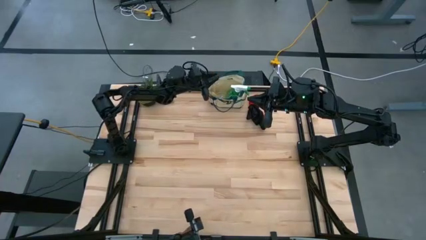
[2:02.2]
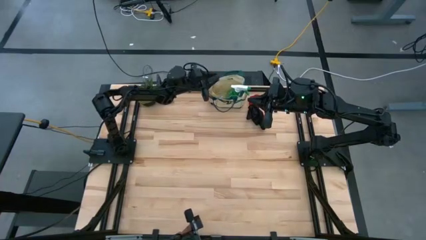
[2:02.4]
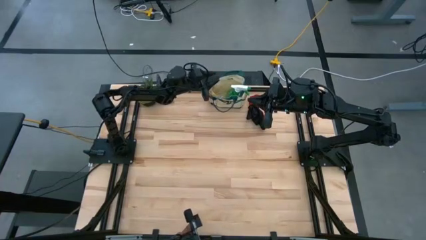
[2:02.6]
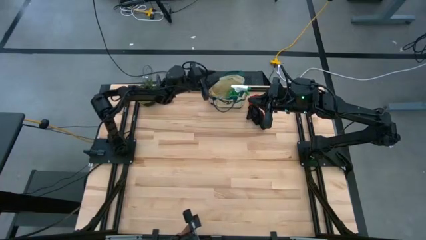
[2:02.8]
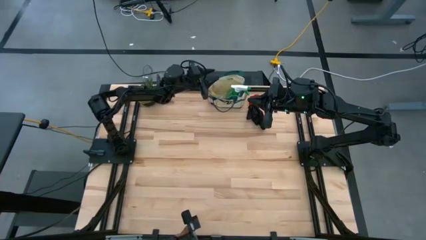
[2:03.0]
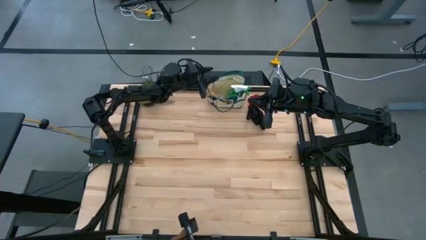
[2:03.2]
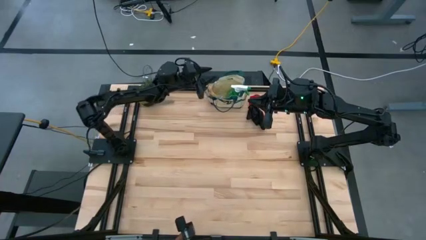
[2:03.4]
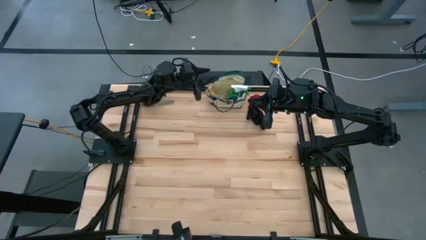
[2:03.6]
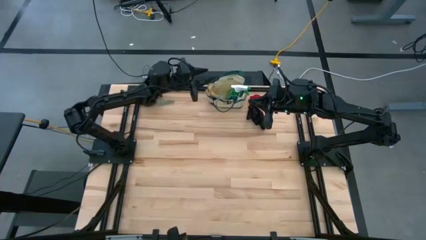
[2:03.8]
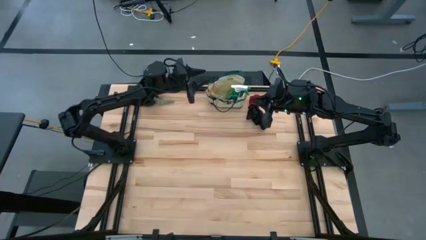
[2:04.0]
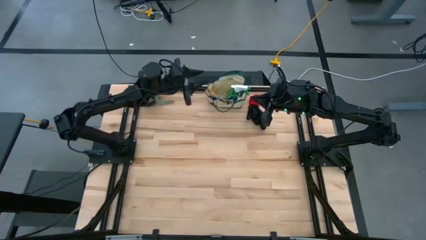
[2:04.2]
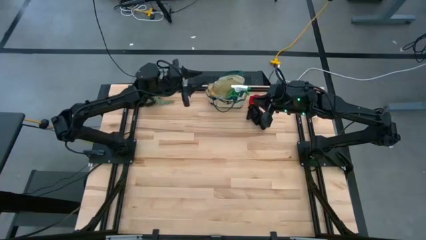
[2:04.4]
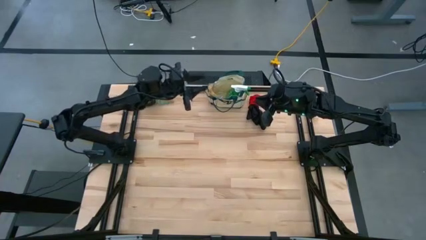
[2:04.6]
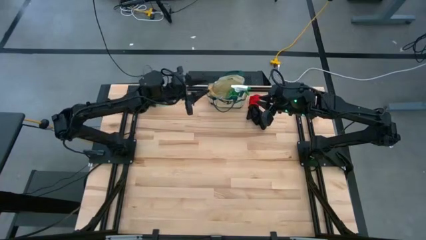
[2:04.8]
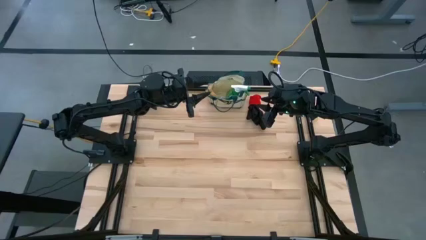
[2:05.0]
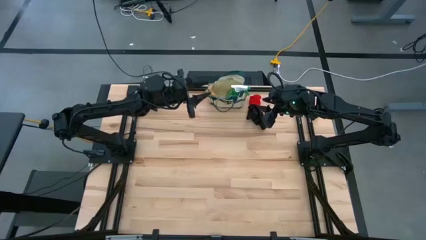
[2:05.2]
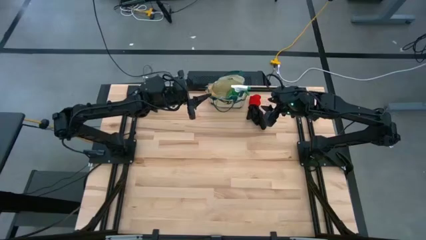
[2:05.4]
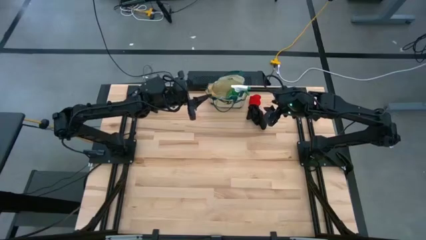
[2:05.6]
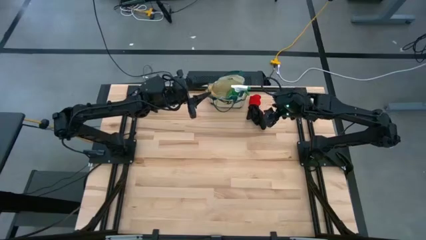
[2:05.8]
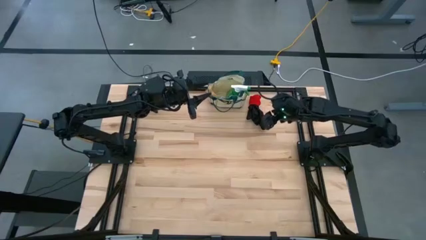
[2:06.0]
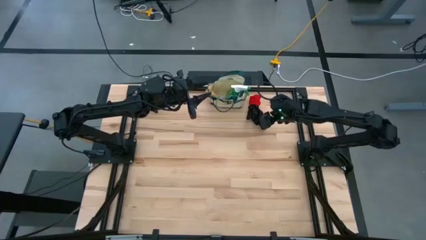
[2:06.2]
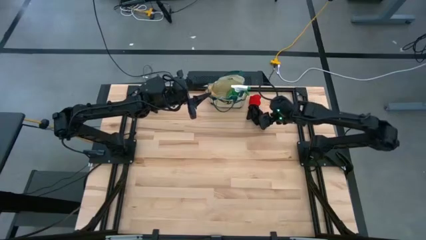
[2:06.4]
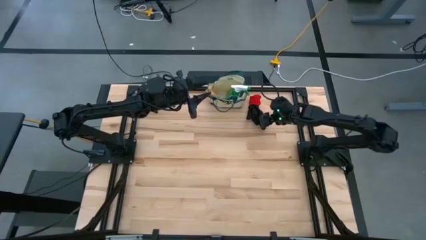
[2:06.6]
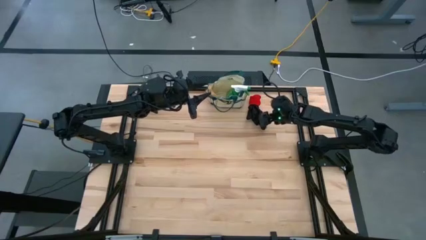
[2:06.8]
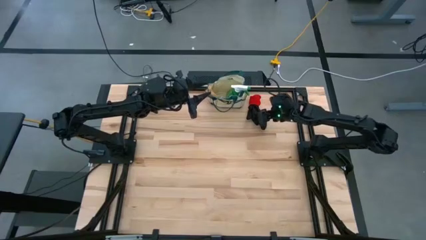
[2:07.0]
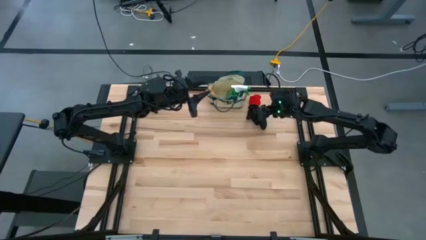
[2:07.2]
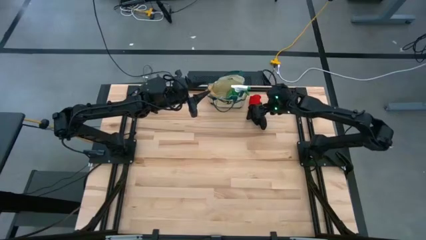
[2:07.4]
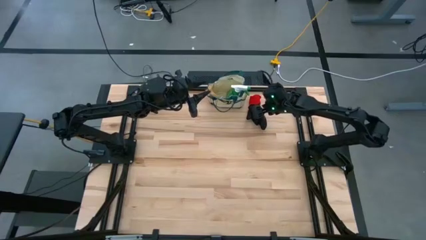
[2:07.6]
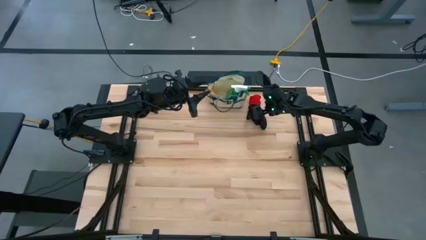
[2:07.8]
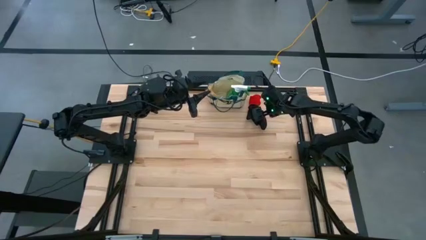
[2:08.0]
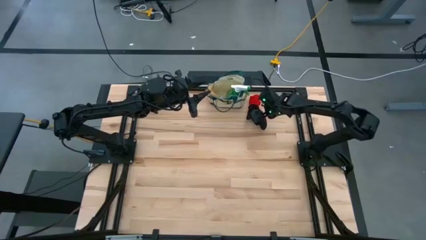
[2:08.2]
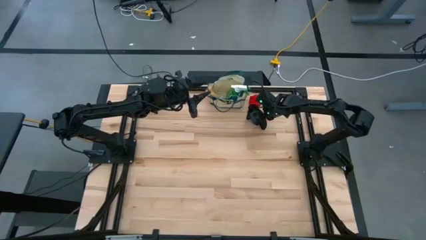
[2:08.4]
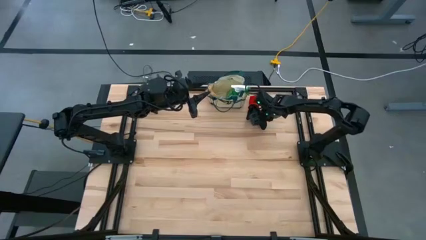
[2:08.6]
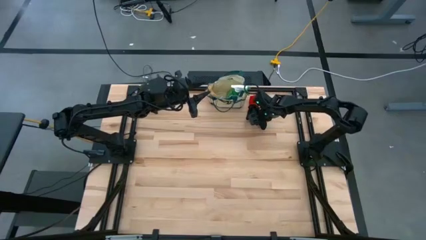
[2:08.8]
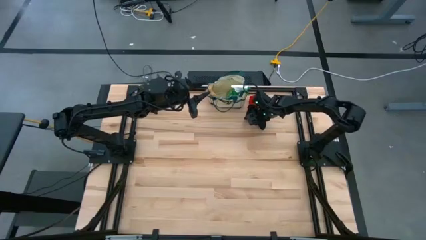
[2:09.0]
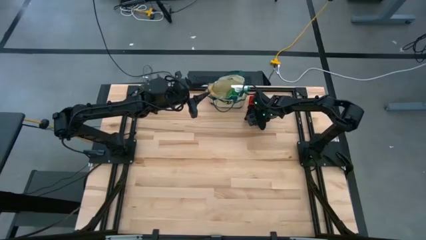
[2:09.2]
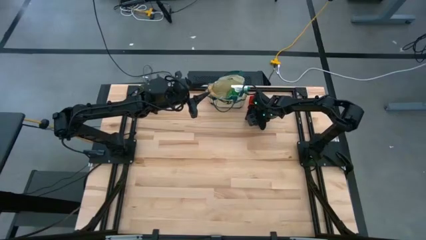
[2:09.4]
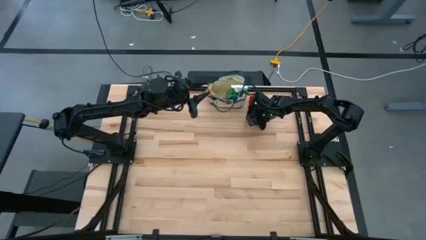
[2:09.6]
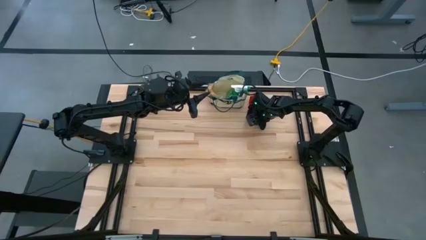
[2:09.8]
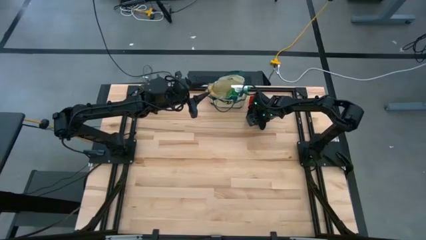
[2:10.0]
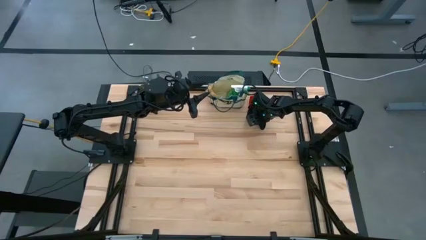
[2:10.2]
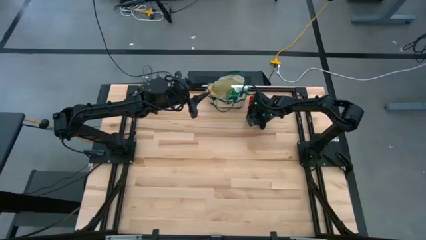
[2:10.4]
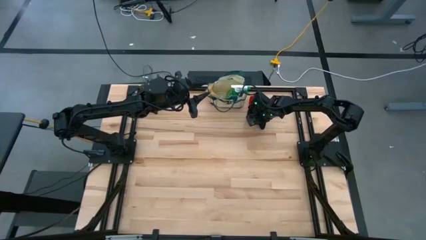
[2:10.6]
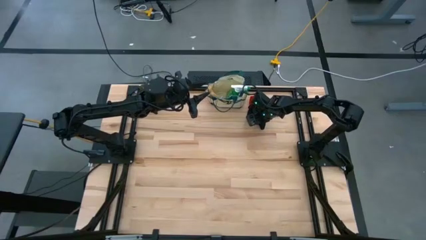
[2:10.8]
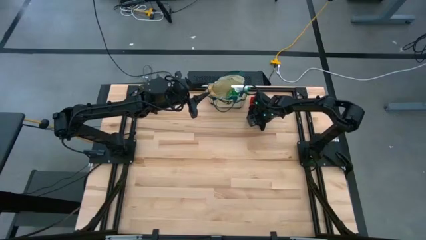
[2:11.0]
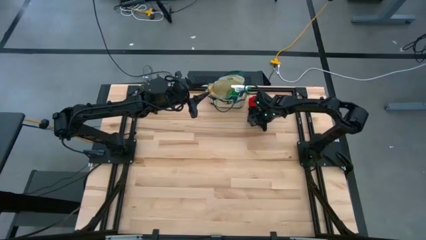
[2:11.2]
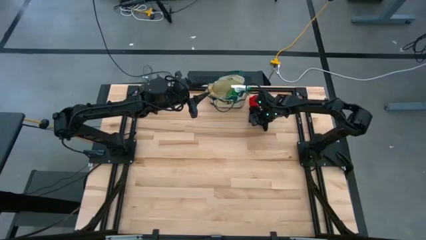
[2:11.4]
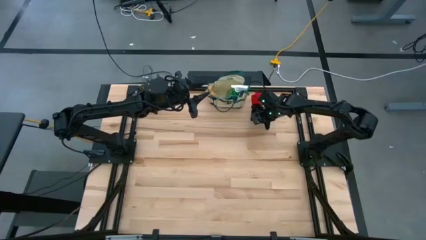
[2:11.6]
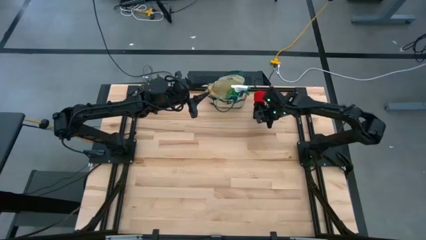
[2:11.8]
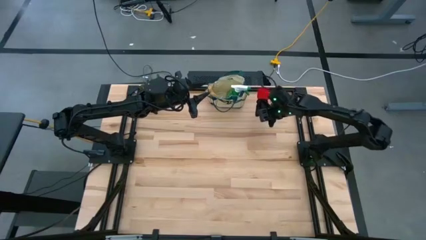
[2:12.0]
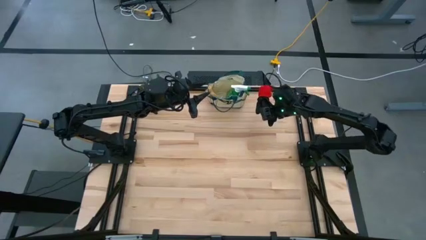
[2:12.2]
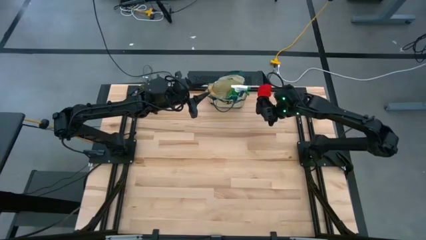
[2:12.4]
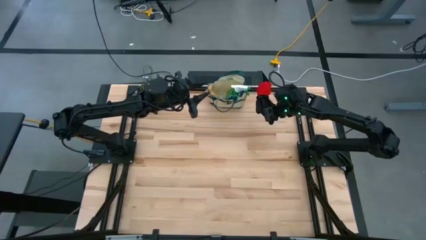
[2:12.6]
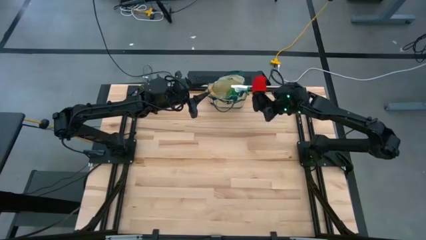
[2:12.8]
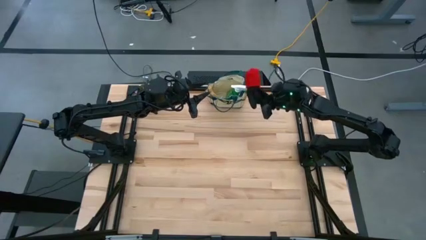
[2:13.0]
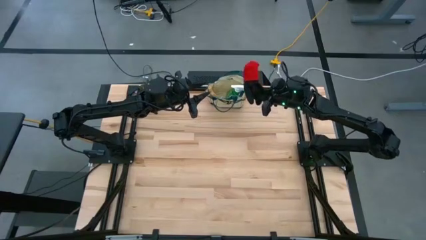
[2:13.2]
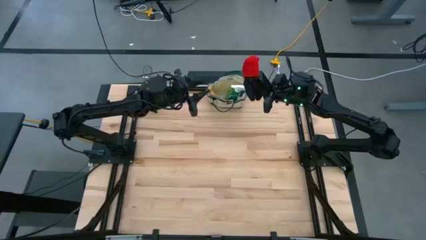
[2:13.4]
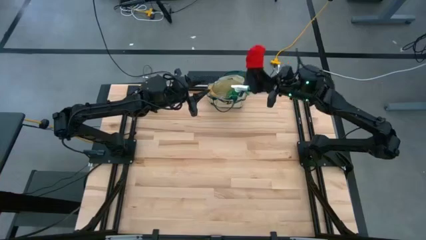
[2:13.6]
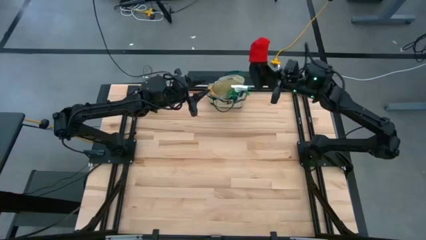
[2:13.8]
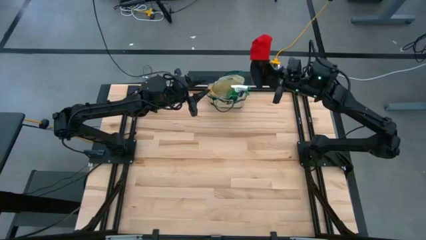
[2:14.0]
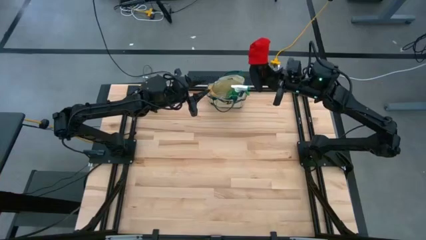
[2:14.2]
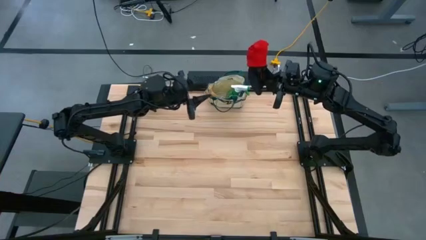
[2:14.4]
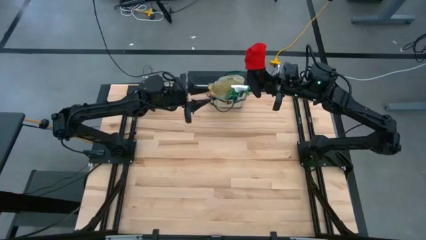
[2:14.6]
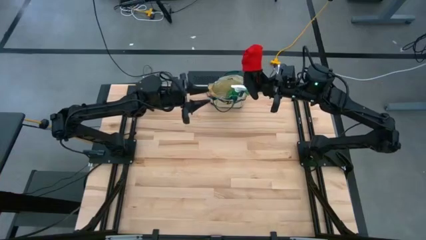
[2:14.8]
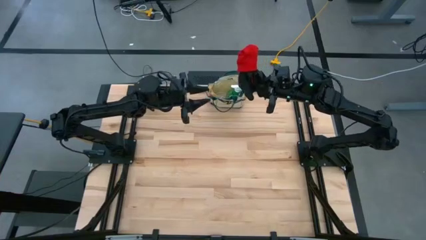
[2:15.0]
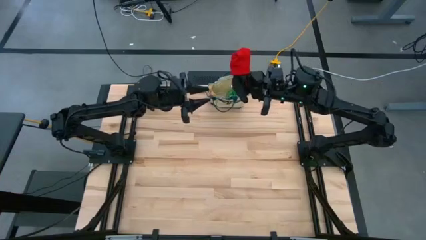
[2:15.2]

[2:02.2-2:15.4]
Task: Pick & Place Garden tools in Gardening bag
Put the red gloves into the white gardening bag

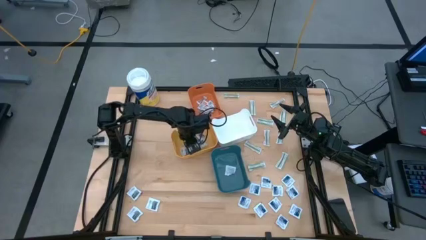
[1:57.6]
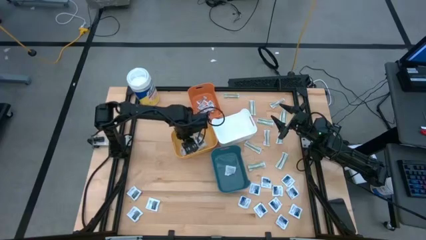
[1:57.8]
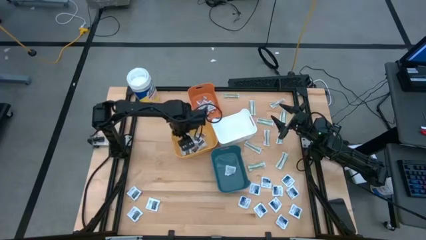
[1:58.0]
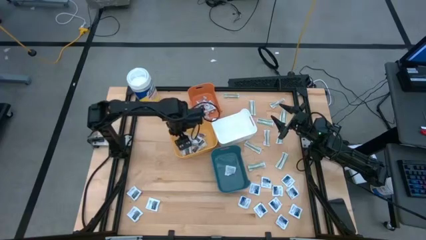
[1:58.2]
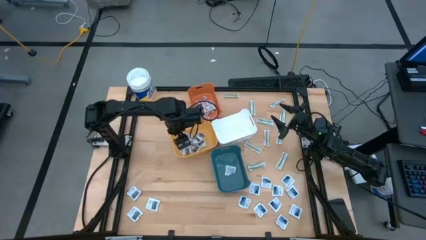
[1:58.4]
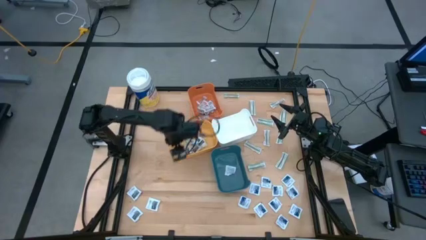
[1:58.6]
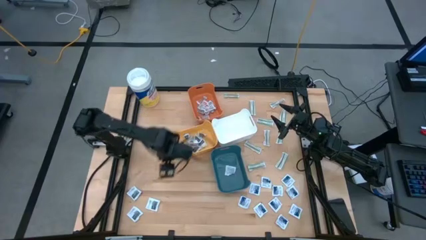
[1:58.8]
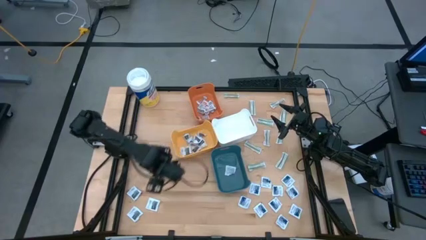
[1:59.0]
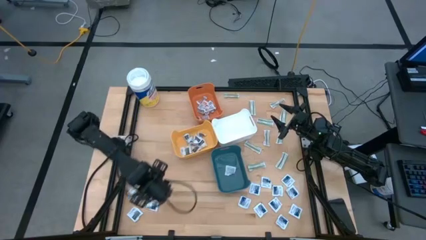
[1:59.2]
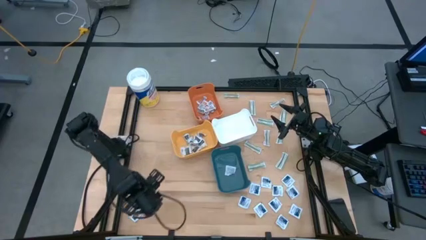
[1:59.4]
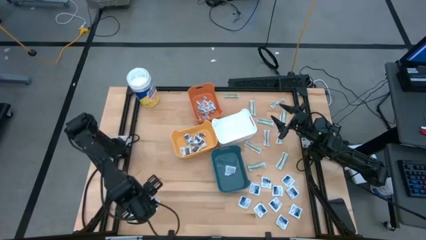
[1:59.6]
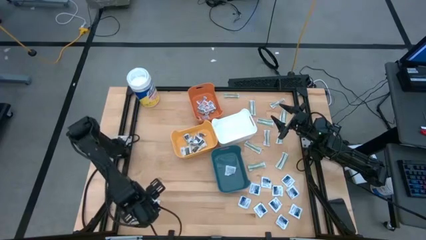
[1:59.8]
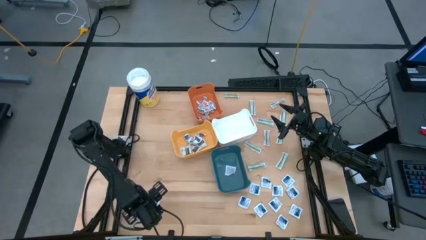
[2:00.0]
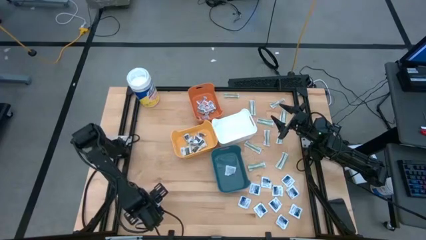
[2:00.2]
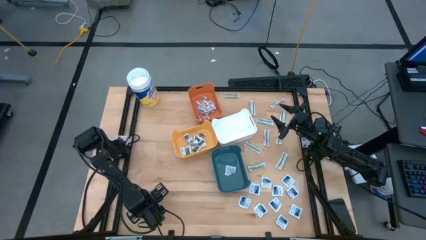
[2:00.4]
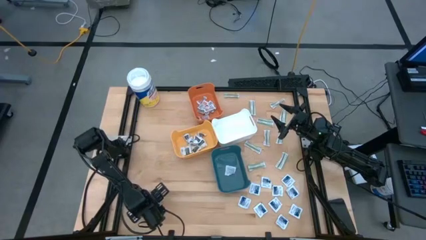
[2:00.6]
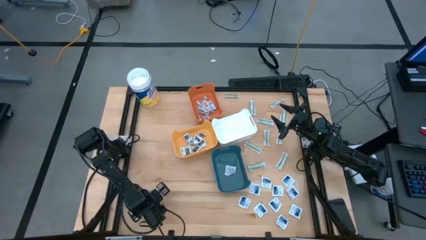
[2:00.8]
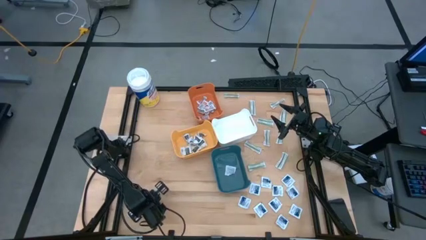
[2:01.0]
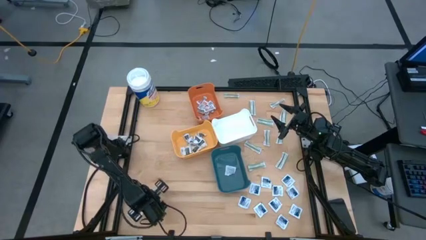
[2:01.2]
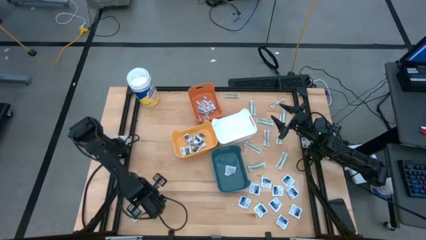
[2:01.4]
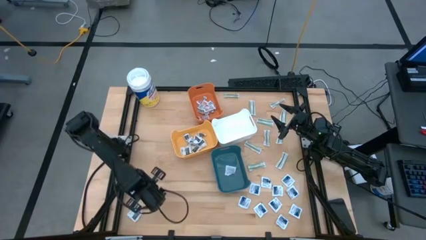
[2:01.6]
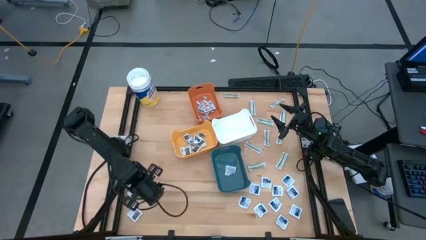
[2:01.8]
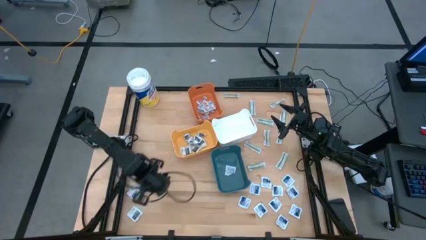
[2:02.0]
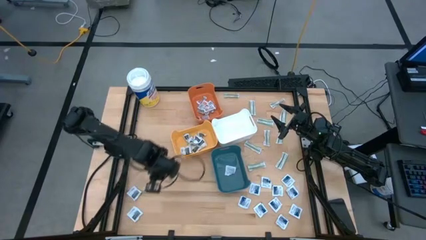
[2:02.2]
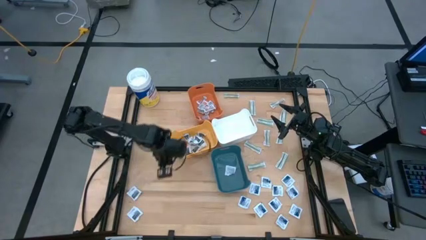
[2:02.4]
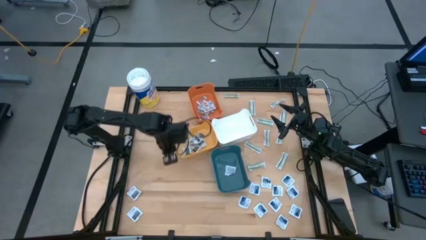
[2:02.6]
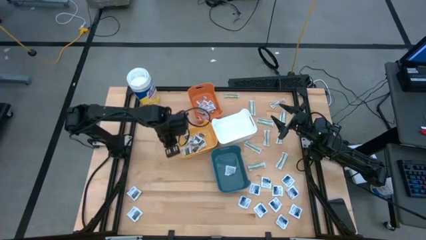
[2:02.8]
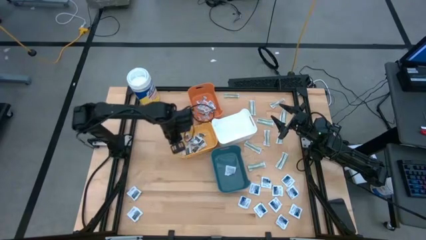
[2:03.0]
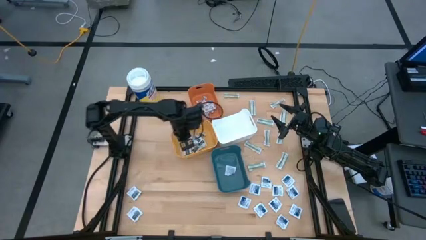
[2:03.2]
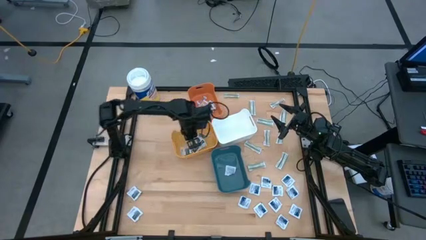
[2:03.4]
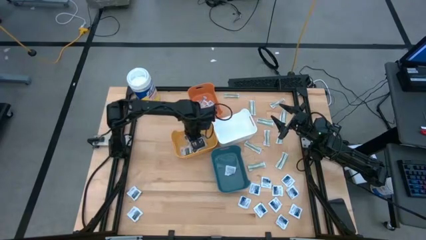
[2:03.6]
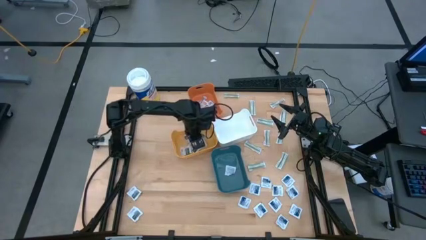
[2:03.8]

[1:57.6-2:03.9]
Task: Pick & Place First Aid Supplies
Put the black towelette pack into the yellow bin
